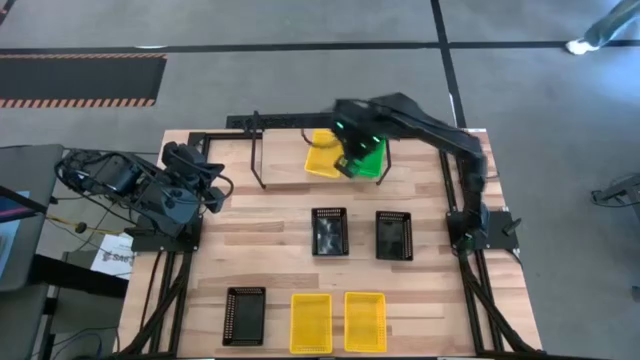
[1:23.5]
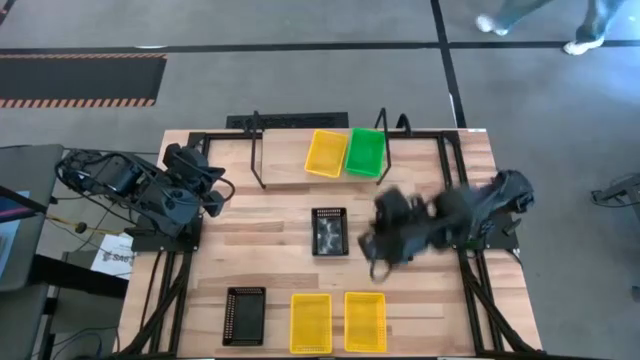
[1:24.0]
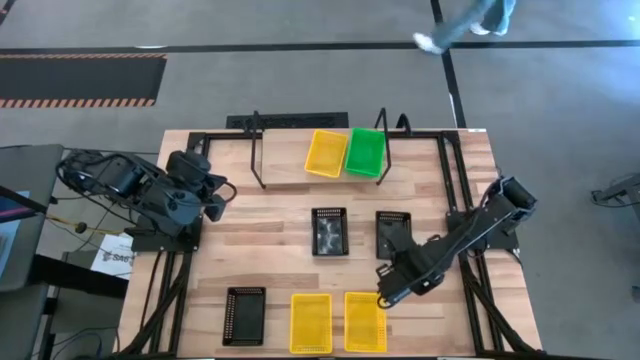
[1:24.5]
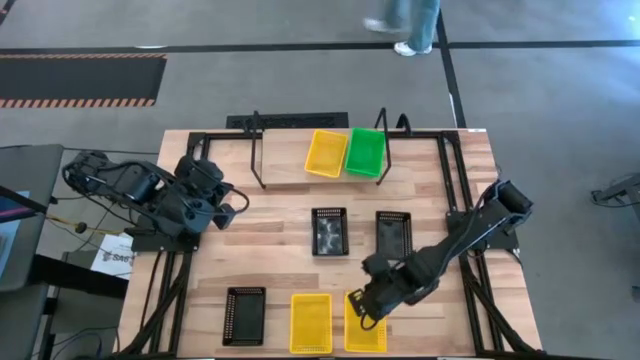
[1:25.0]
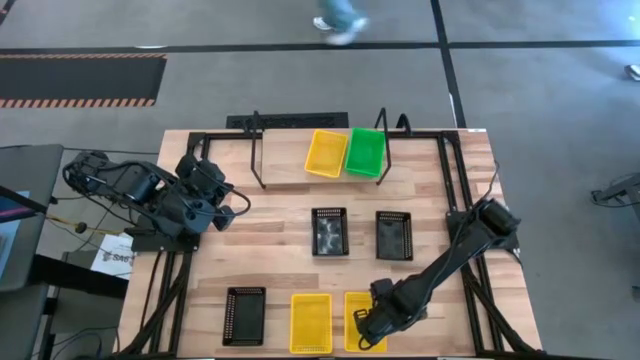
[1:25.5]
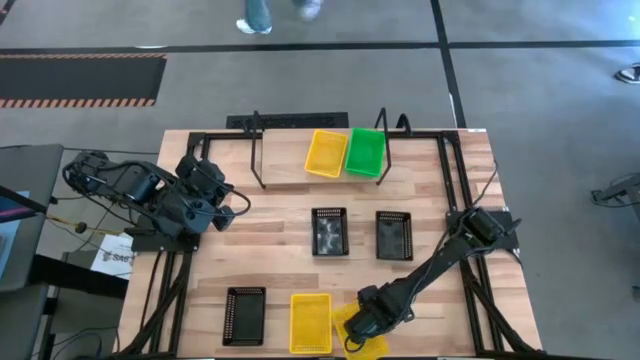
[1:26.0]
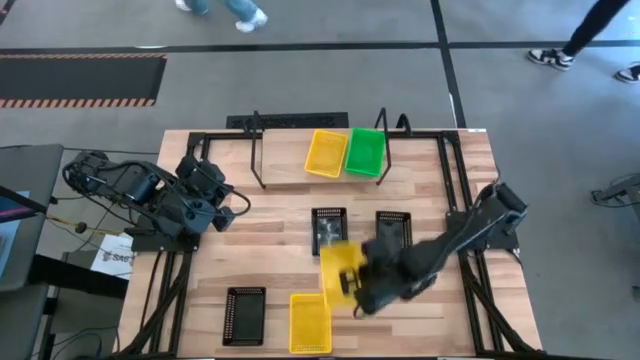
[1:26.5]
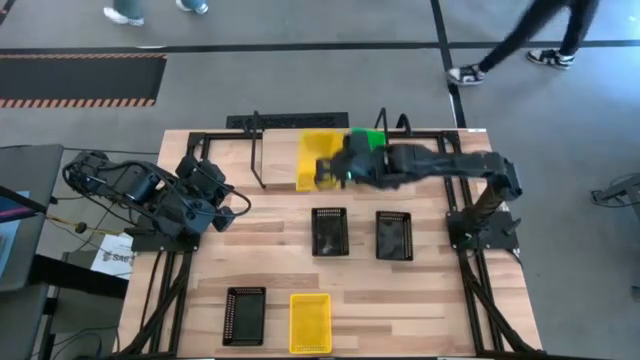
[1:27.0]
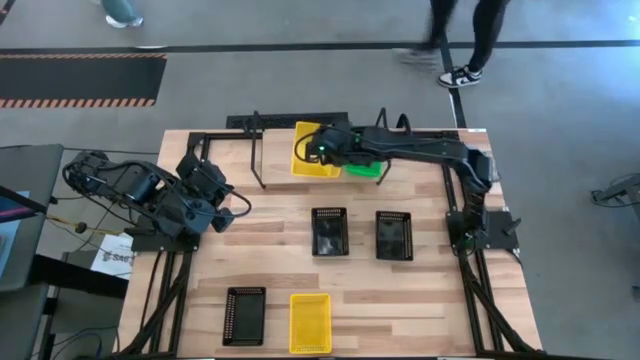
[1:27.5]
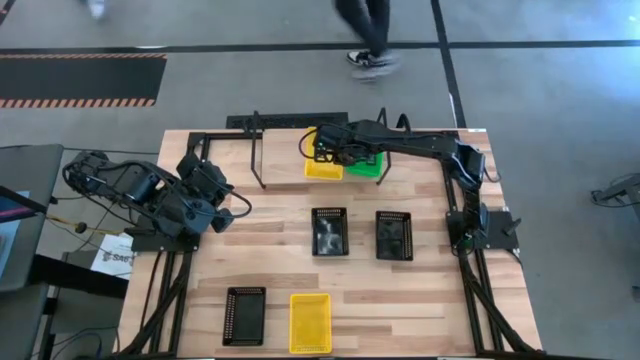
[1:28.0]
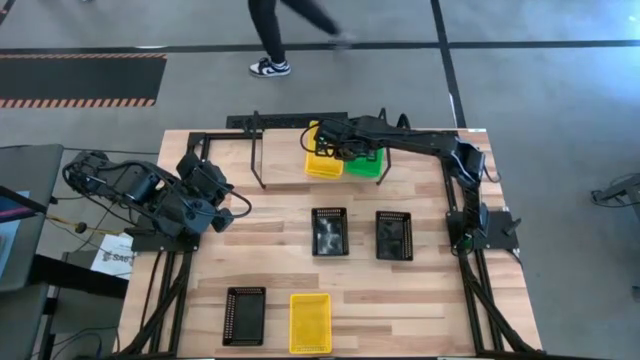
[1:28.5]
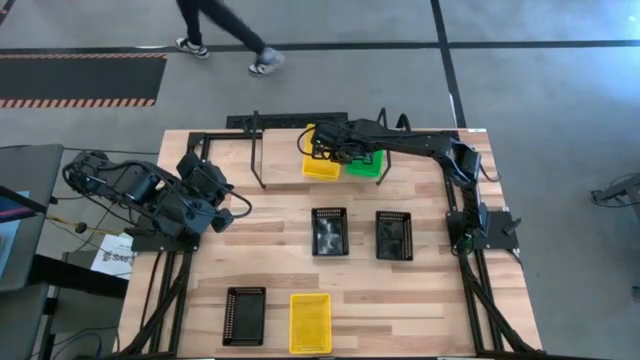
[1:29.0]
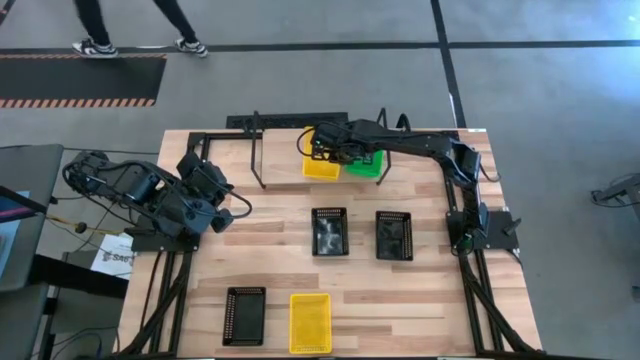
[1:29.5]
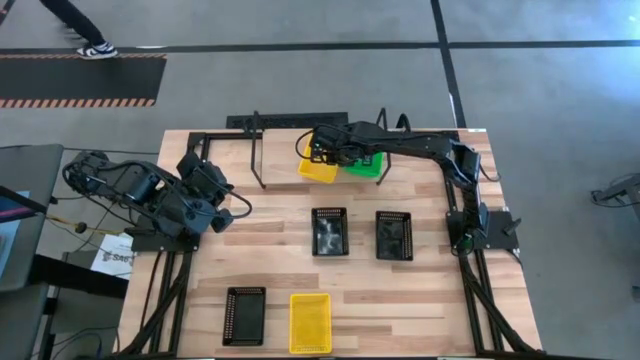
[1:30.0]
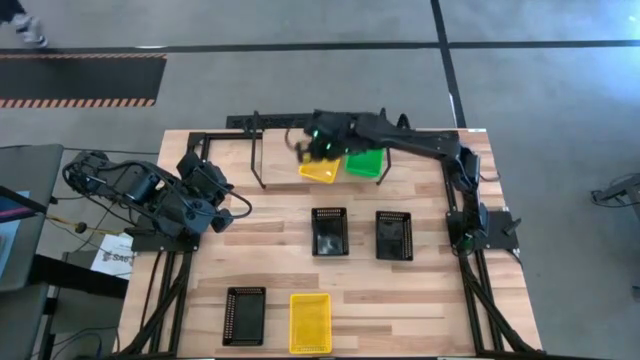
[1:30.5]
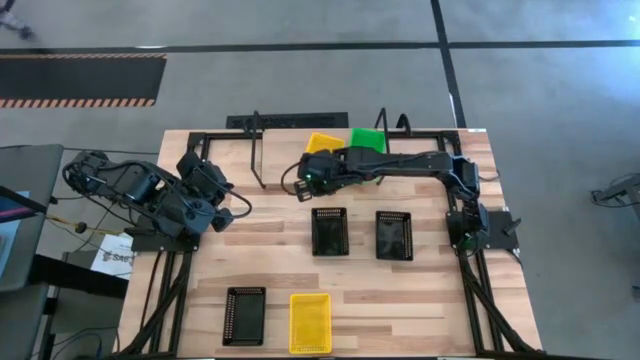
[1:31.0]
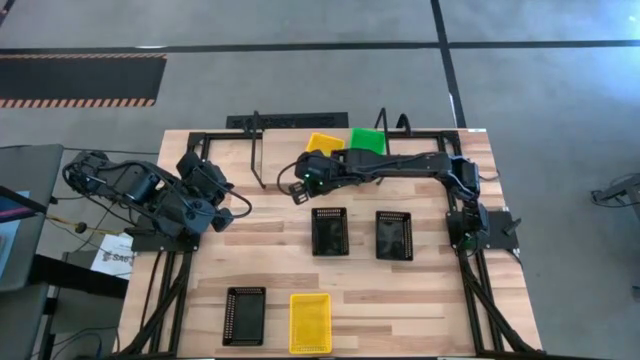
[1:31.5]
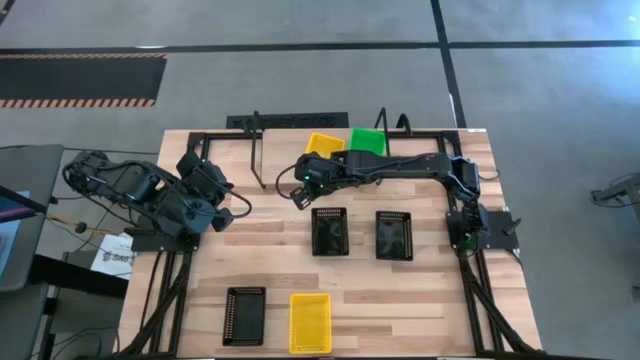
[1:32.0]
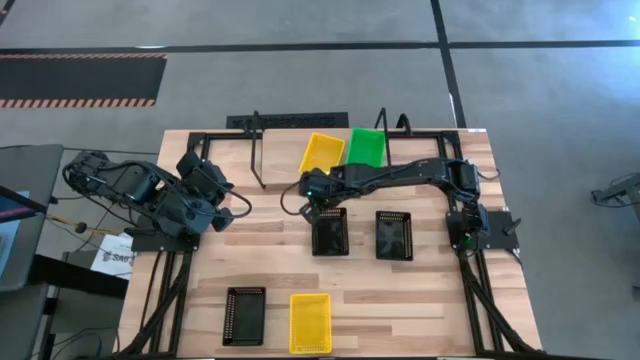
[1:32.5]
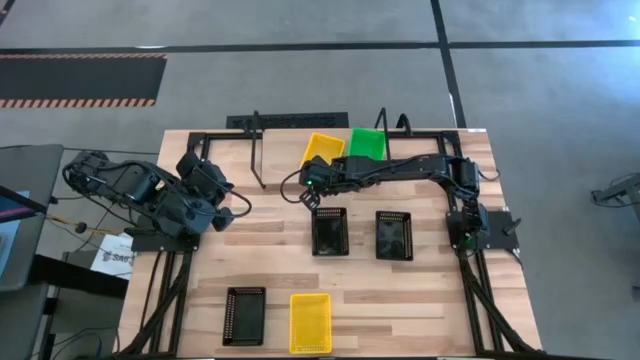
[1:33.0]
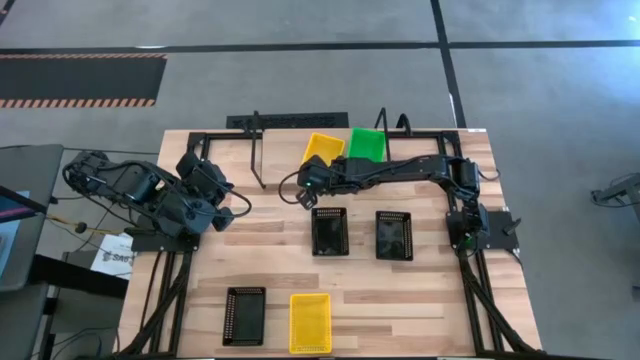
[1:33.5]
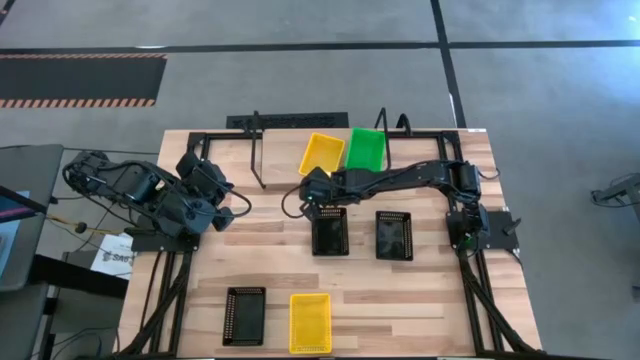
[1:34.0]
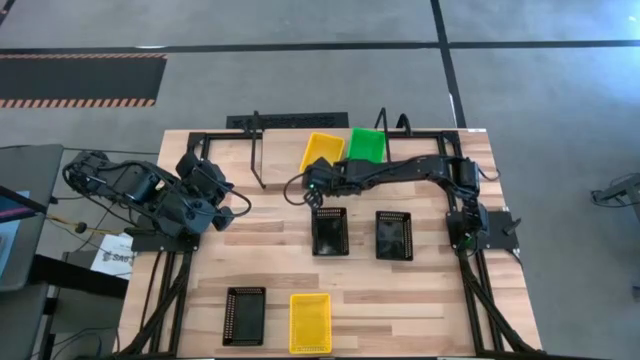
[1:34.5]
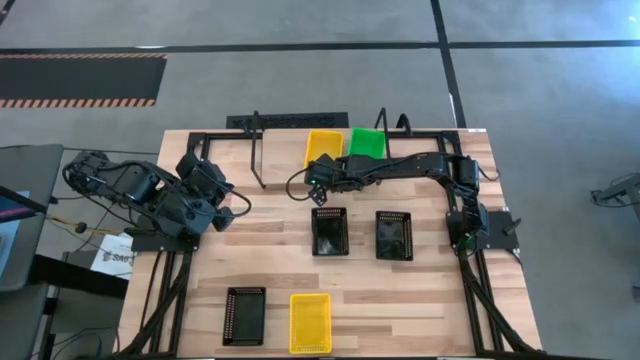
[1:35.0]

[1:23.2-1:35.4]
Task: Stack baskets on shelf by color
Stack the right yellow bin on the yellow bin on the shelf

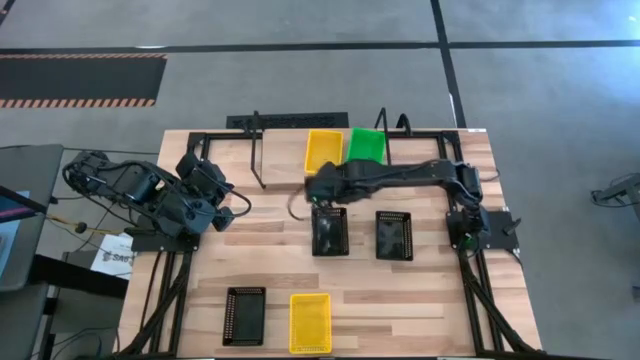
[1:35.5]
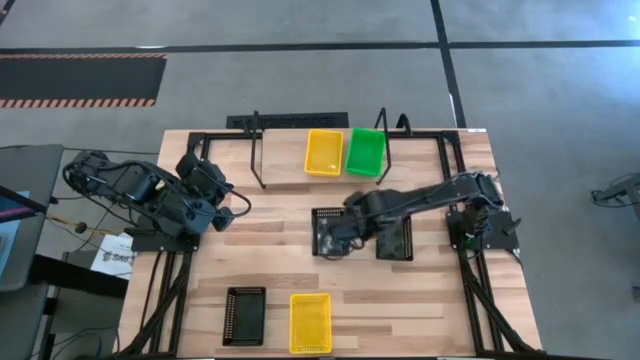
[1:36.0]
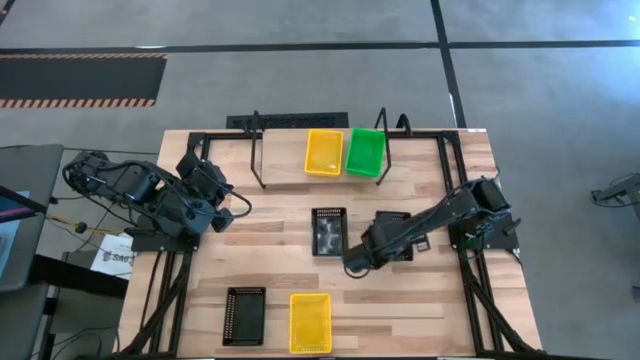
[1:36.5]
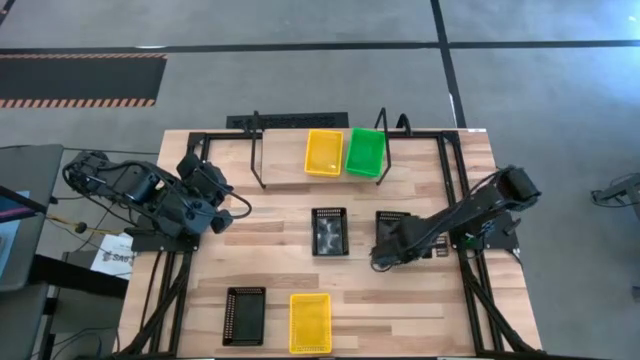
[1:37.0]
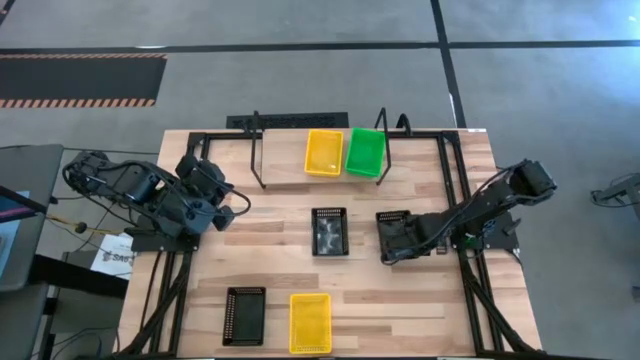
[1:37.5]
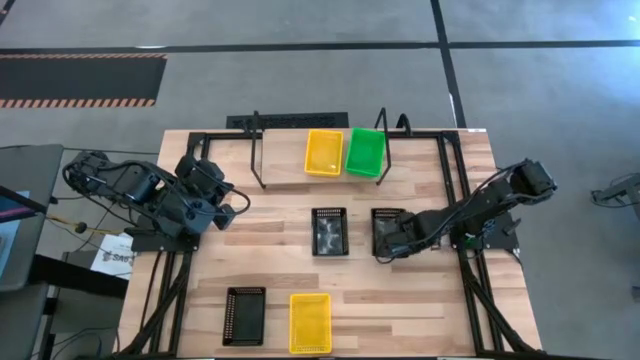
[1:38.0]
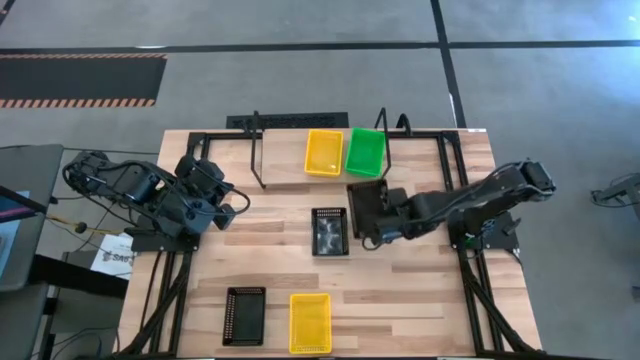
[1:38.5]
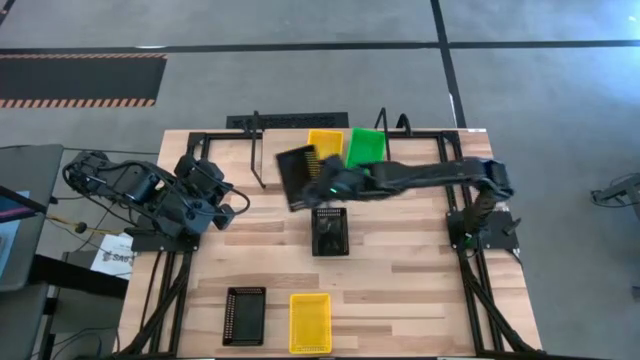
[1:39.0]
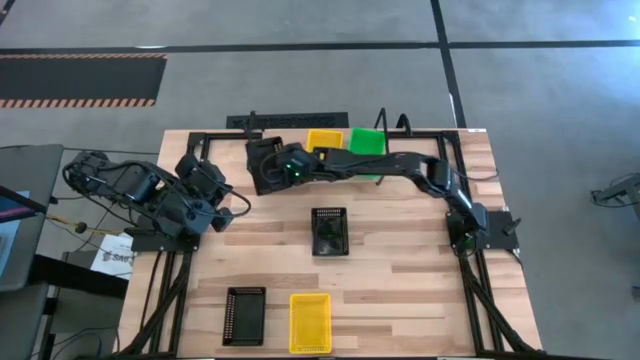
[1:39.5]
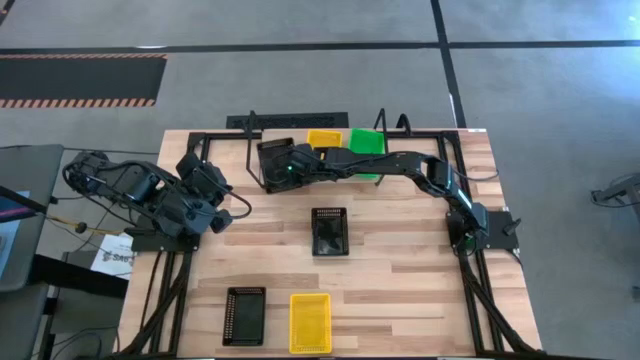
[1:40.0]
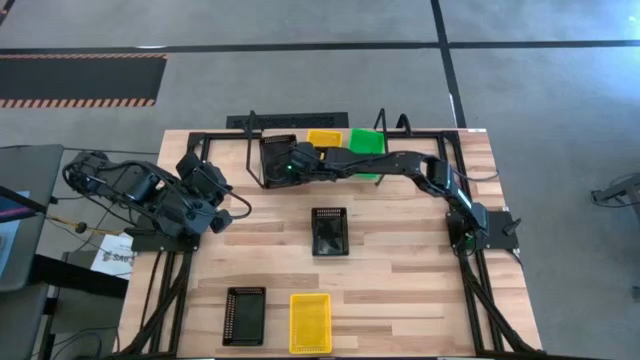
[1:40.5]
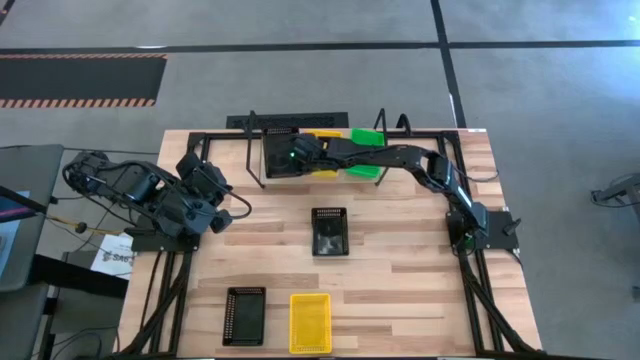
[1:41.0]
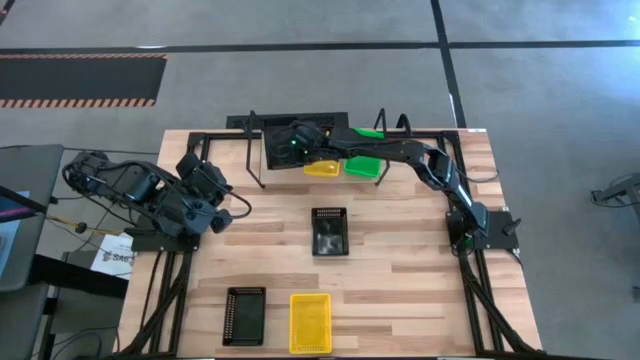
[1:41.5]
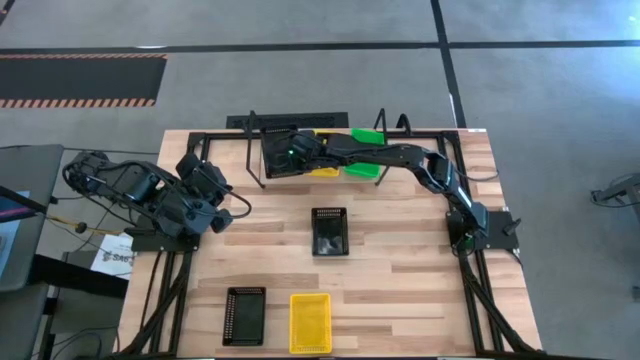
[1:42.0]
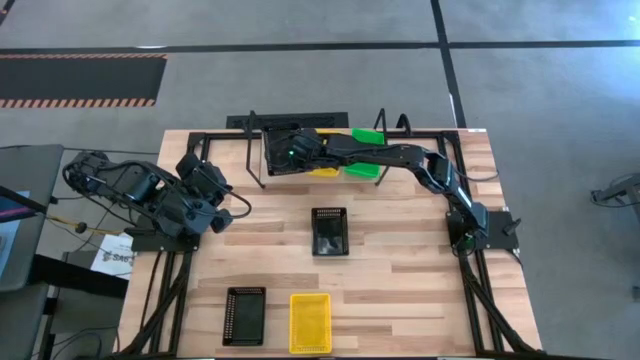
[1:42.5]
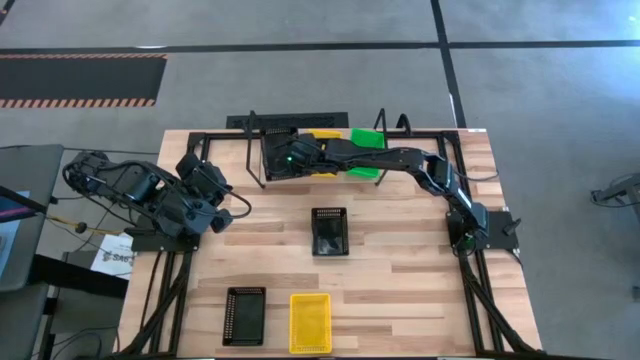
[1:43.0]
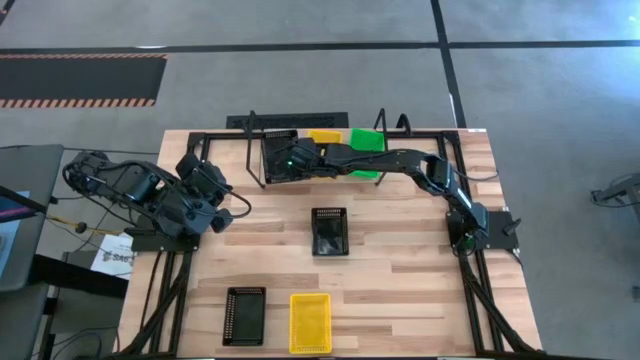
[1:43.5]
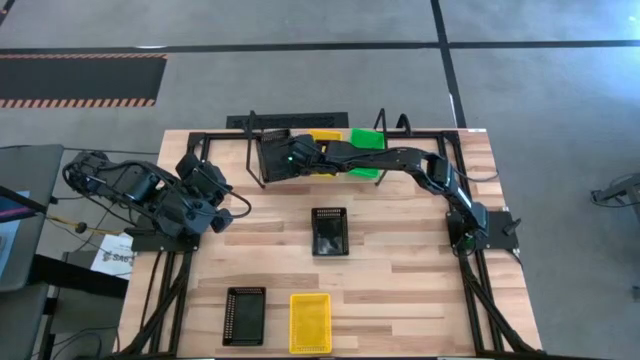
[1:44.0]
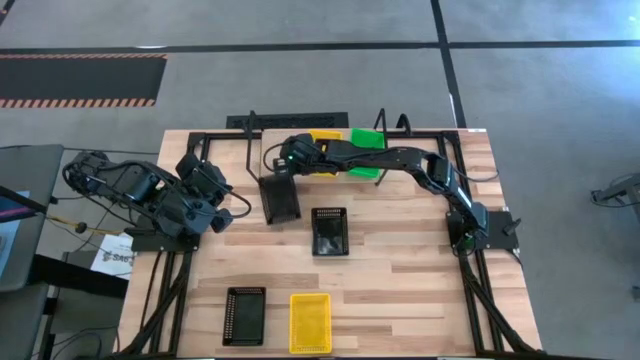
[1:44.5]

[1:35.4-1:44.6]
Put the right black bin on the shelf
